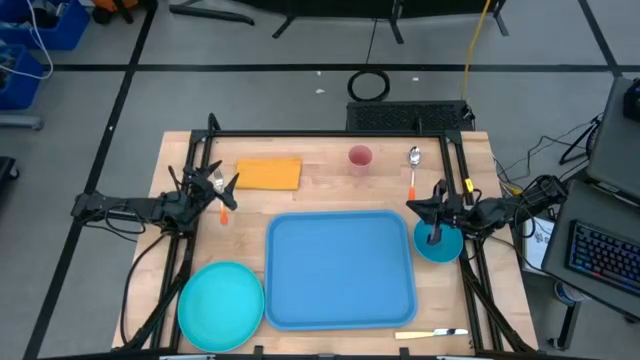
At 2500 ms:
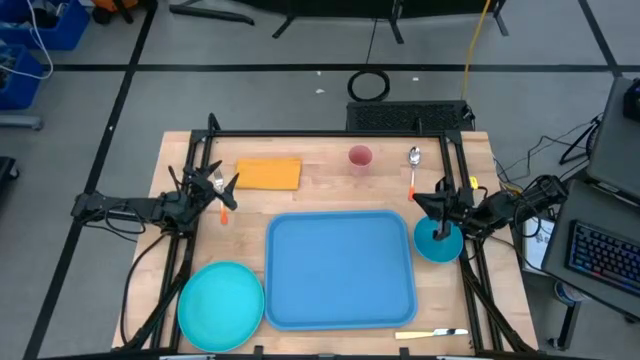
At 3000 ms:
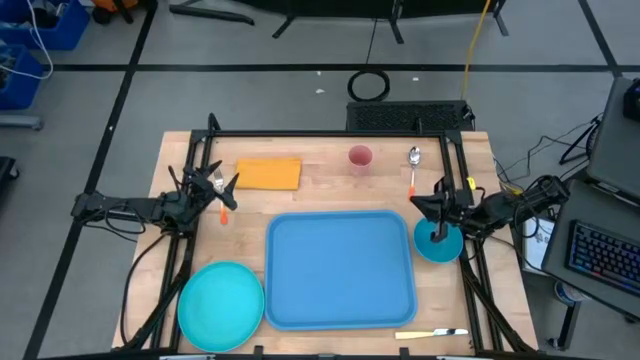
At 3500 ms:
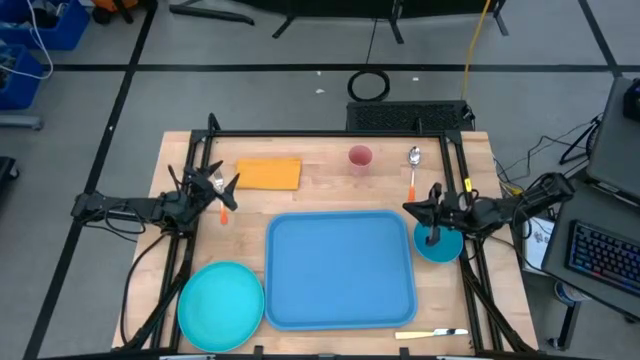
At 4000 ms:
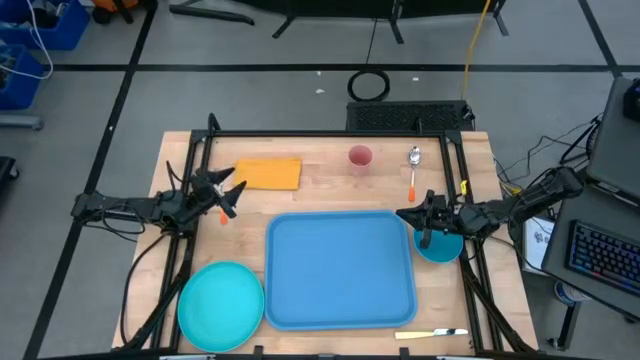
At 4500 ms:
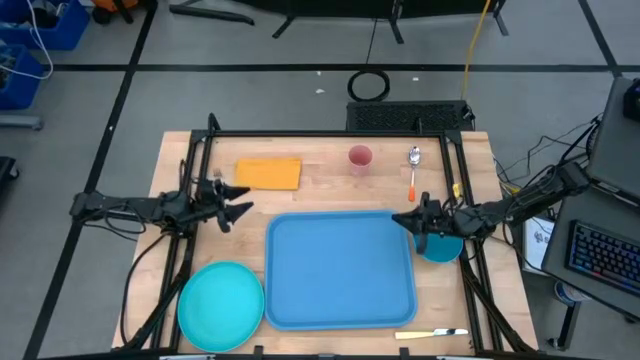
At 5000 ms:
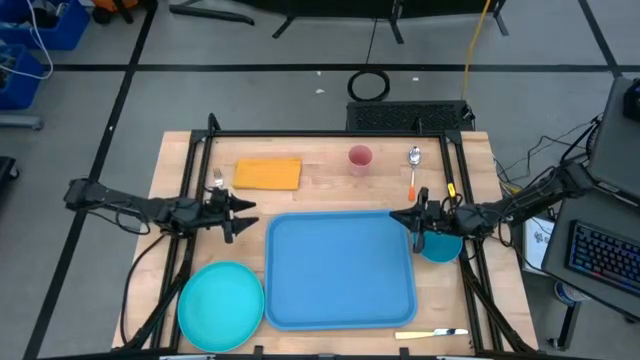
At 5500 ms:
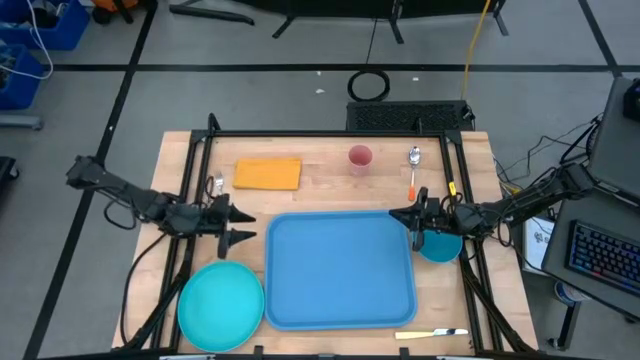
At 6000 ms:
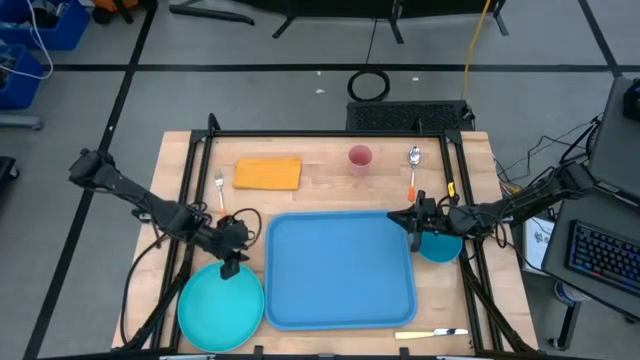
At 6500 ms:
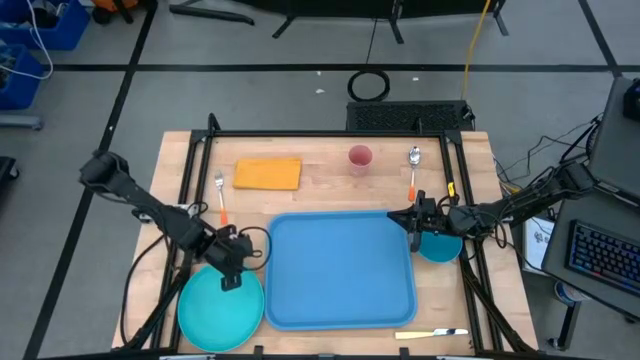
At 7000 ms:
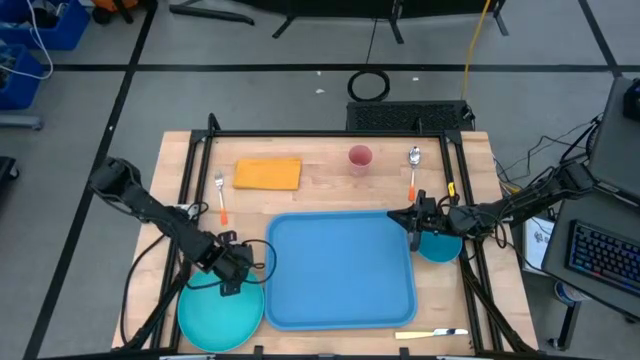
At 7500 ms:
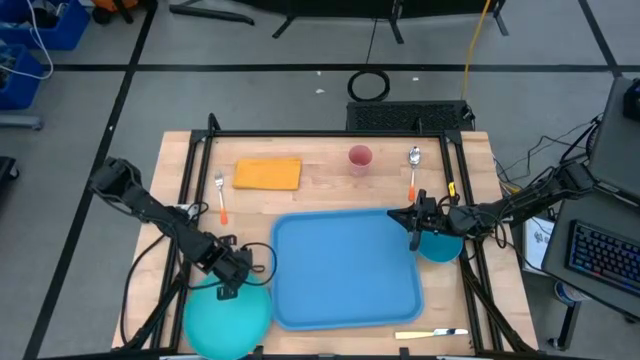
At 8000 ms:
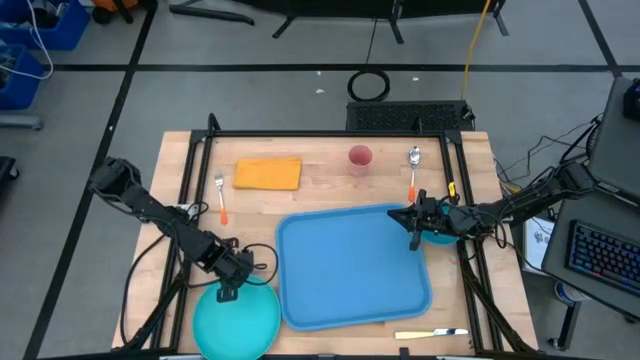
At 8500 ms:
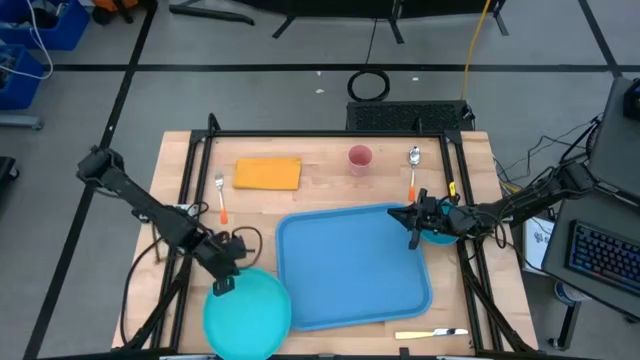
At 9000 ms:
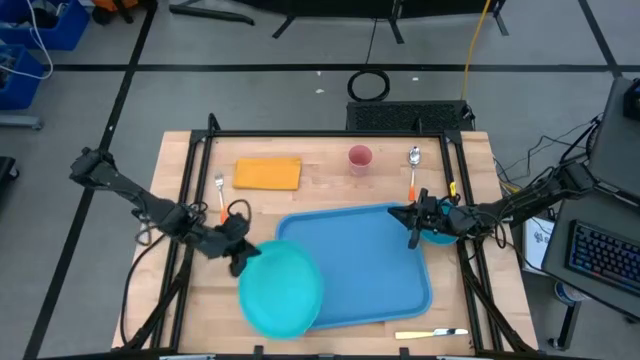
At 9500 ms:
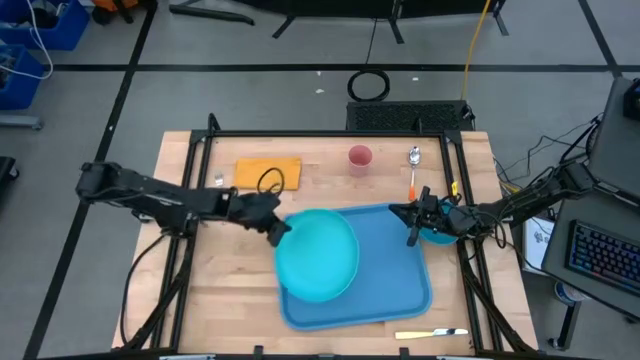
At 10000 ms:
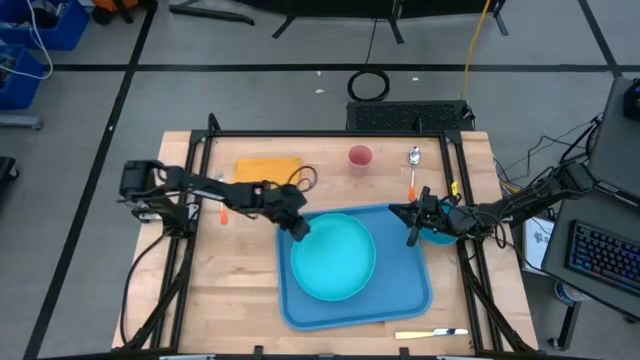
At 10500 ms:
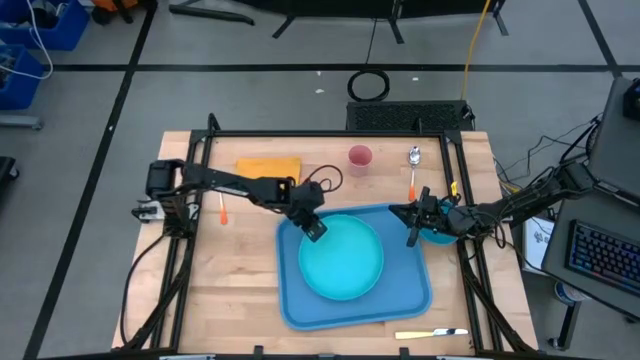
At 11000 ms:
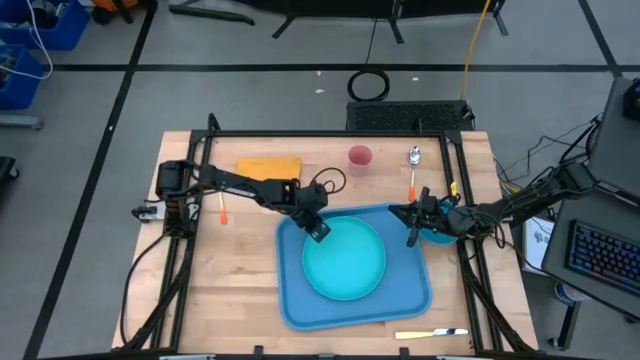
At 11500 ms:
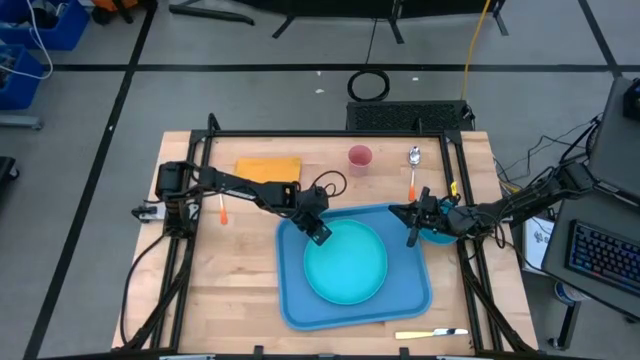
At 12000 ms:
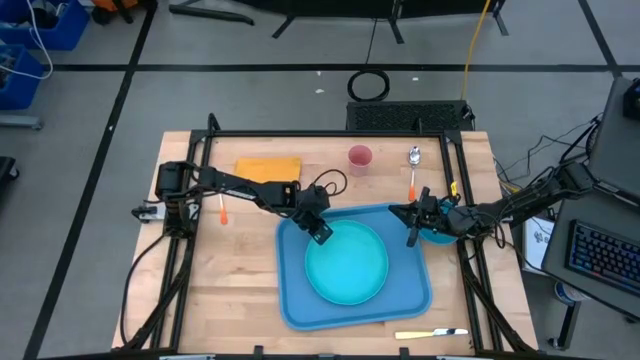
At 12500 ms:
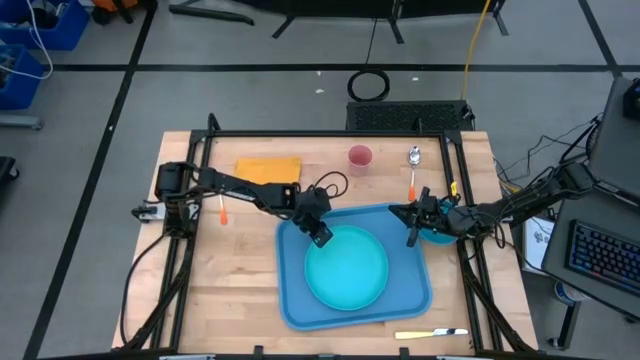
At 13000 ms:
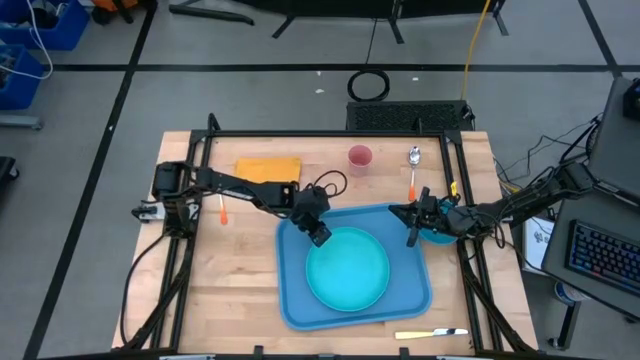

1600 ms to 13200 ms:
Task: Set up tray
Put the green plate on top of the blue tray

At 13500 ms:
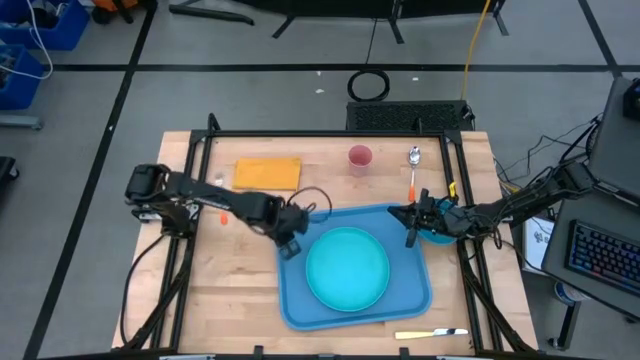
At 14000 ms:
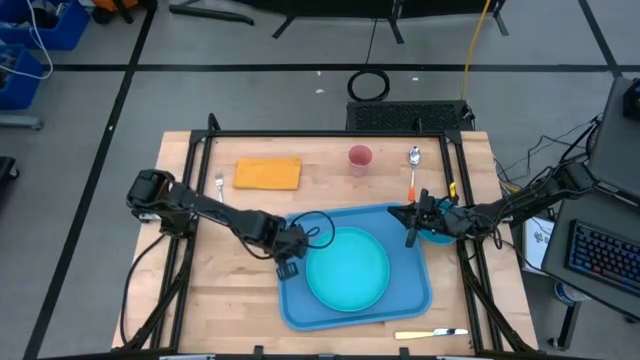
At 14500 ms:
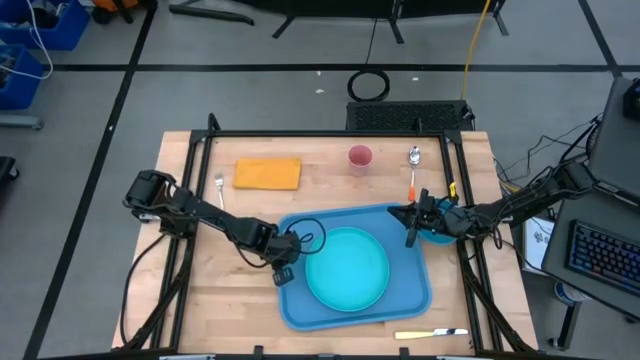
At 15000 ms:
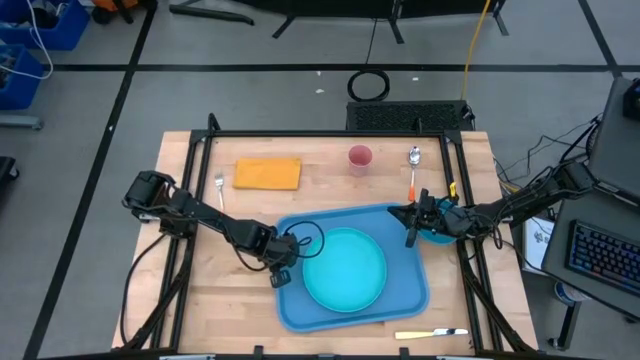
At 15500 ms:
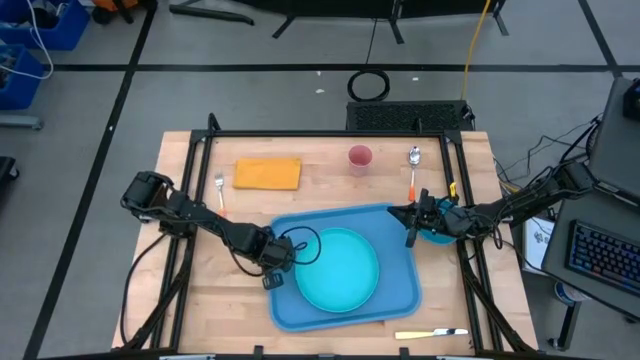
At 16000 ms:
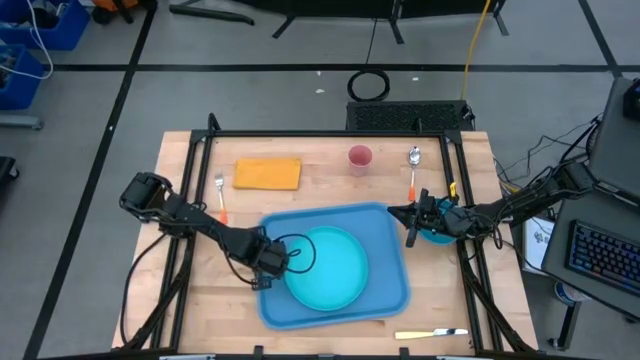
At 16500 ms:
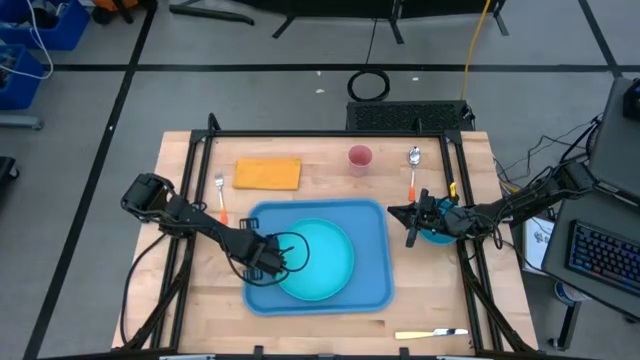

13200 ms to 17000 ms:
Adjust the blue tray

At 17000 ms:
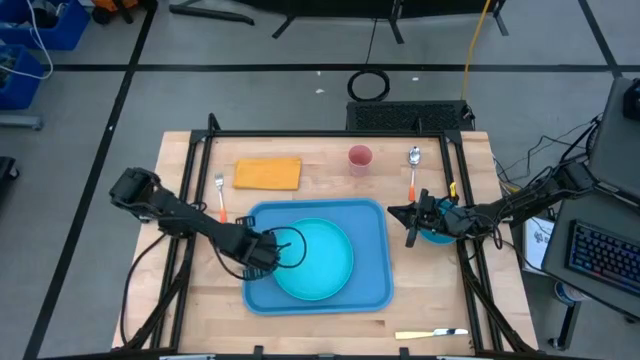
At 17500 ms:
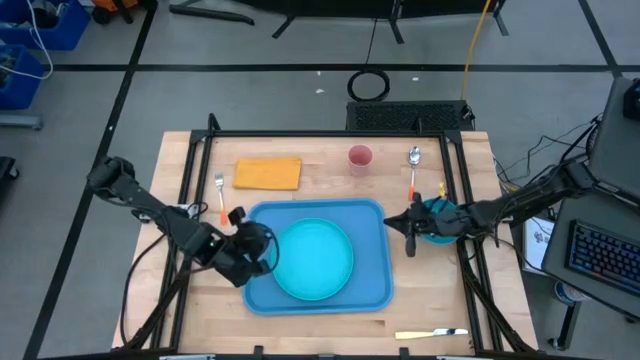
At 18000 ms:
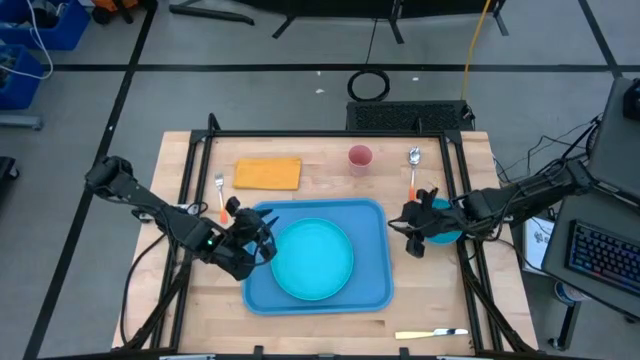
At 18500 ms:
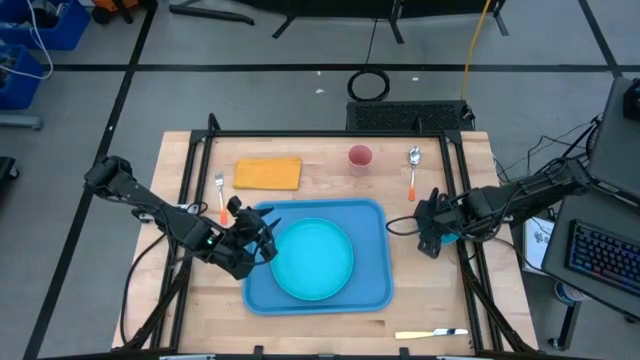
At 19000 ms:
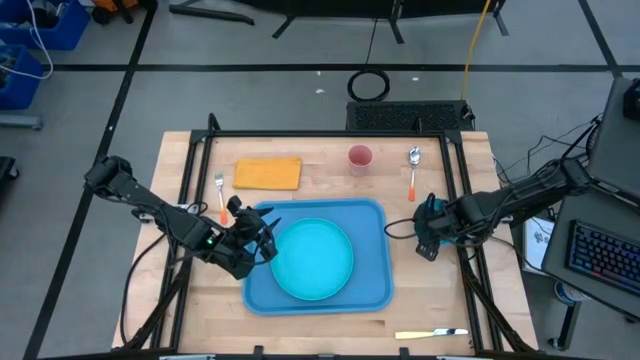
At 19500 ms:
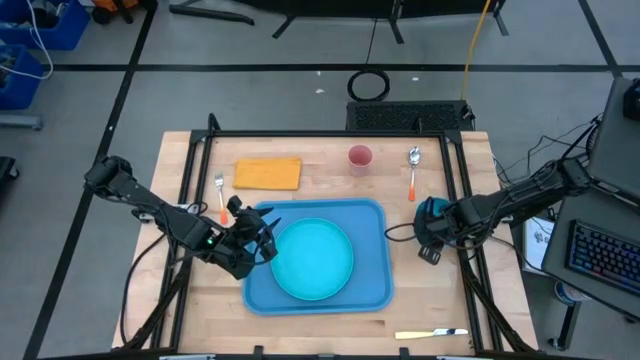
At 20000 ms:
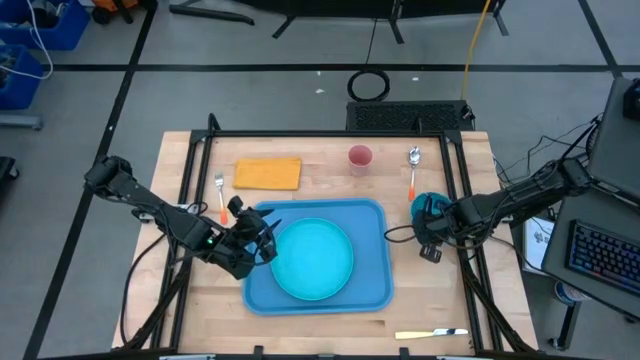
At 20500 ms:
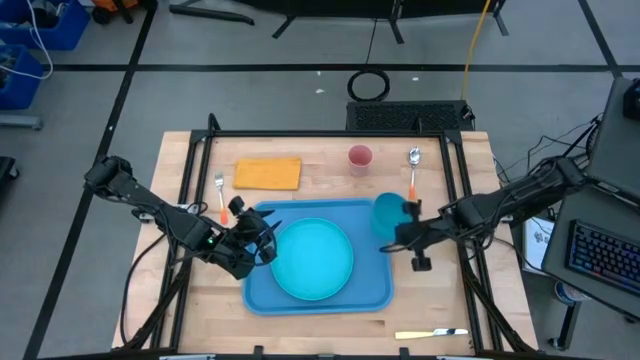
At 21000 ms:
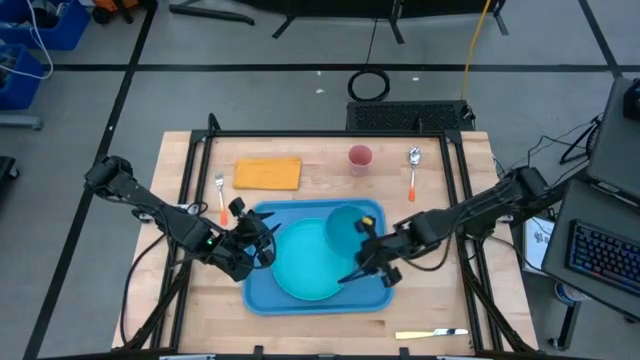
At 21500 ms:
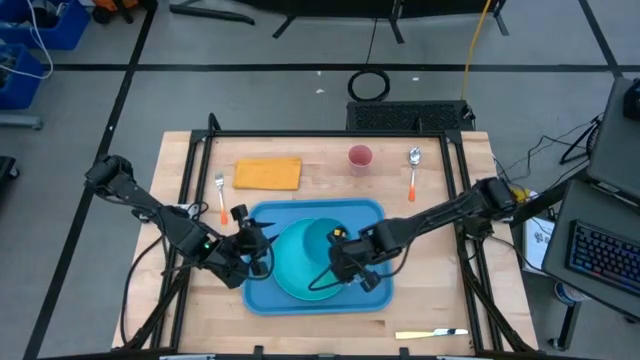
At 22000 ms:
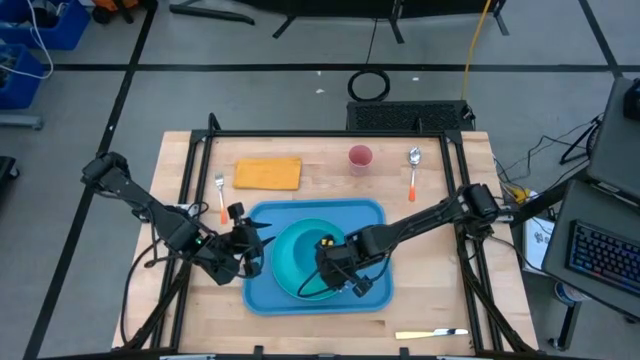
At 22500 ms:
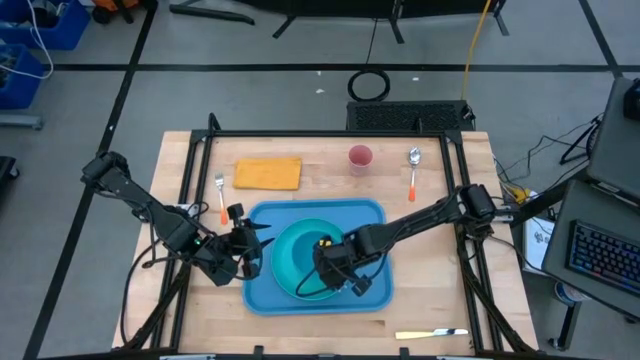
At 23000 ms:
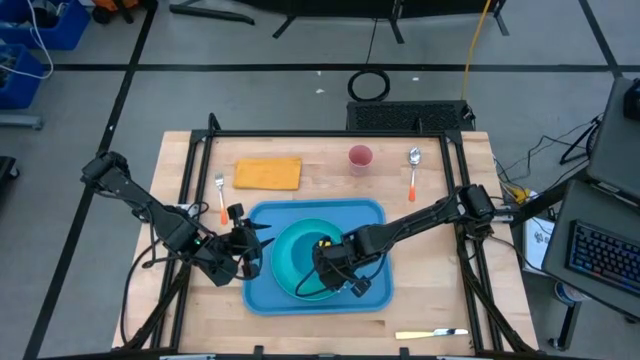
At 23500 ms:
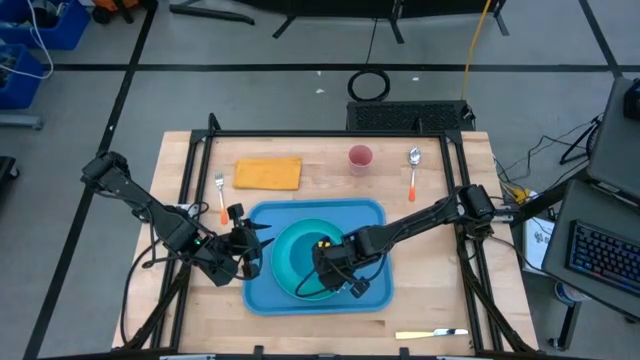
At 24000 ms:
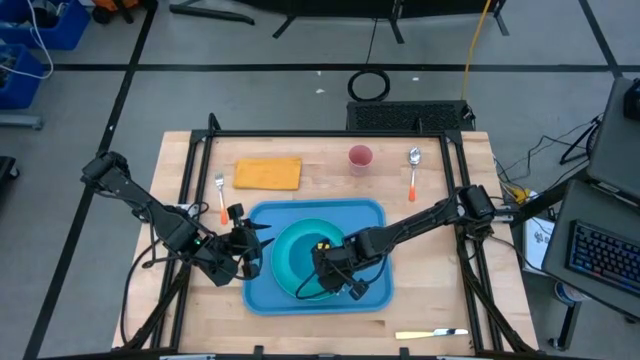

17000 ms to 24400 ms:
Put the blue bowl on top of the green plate
